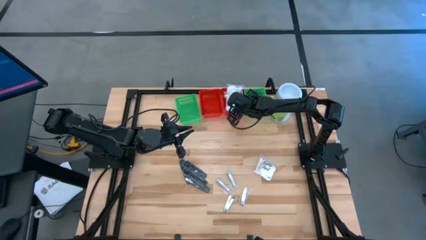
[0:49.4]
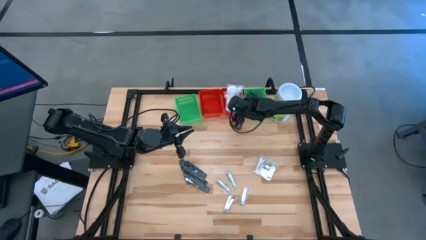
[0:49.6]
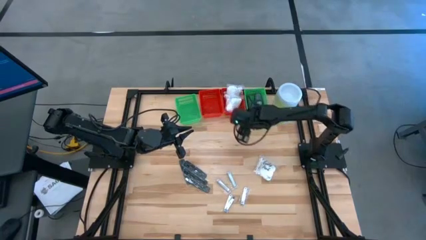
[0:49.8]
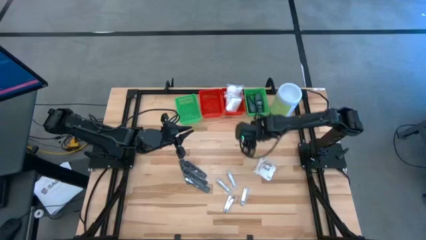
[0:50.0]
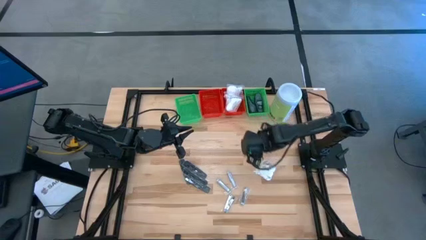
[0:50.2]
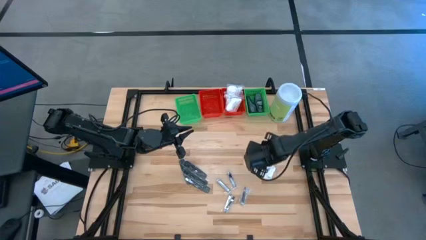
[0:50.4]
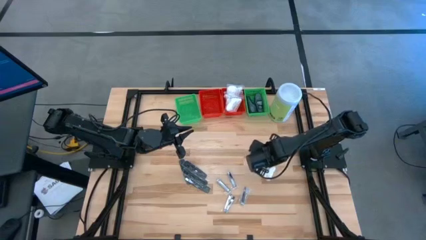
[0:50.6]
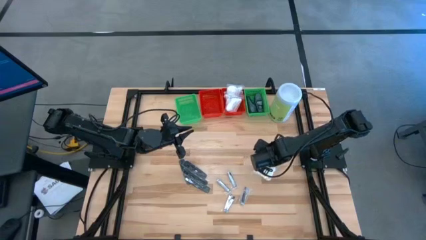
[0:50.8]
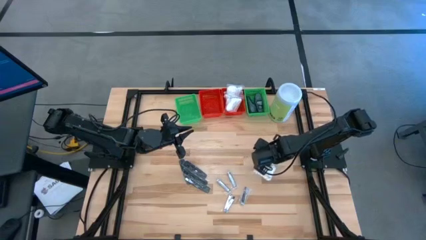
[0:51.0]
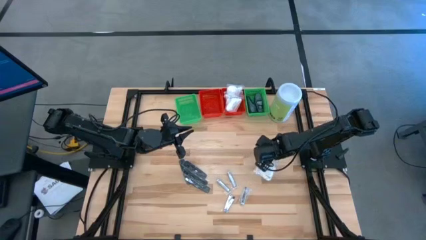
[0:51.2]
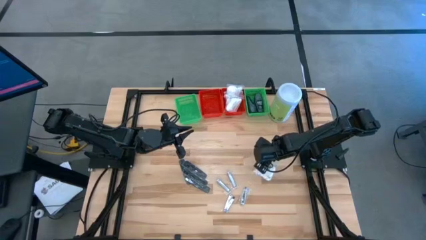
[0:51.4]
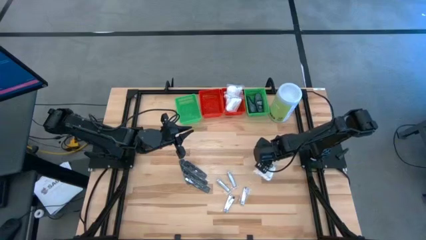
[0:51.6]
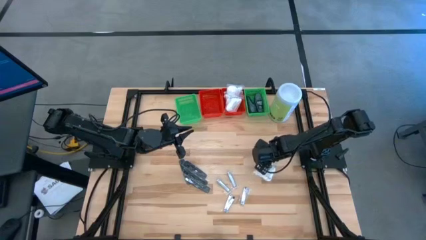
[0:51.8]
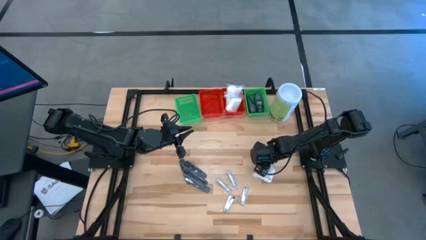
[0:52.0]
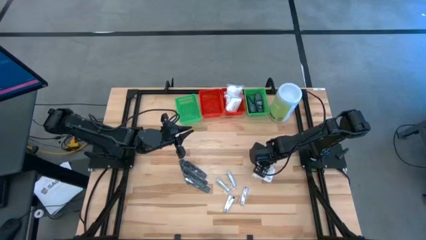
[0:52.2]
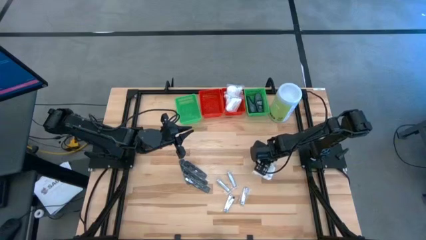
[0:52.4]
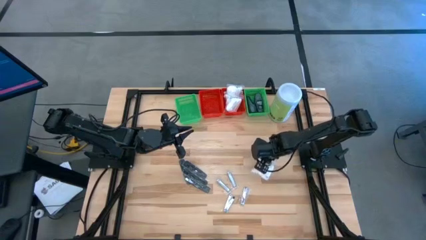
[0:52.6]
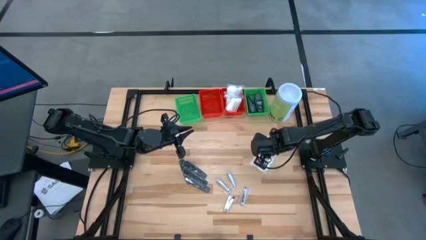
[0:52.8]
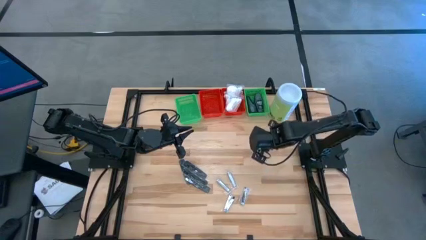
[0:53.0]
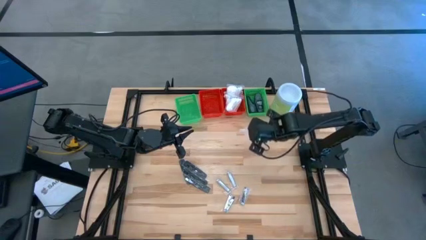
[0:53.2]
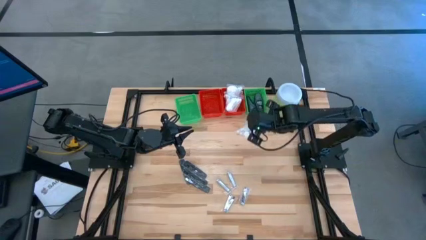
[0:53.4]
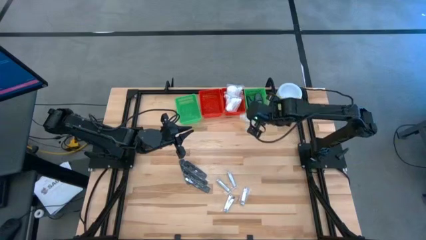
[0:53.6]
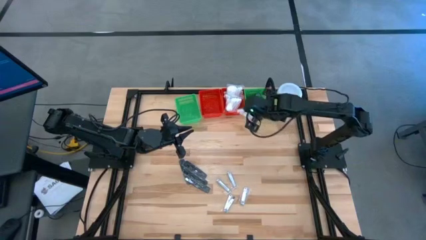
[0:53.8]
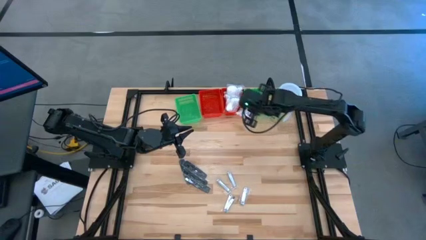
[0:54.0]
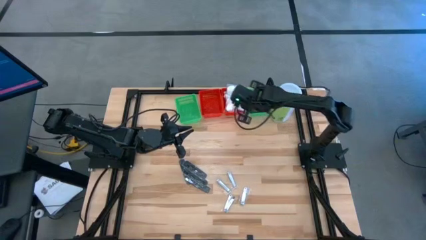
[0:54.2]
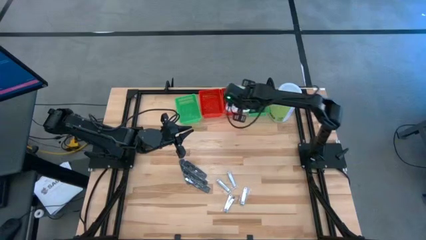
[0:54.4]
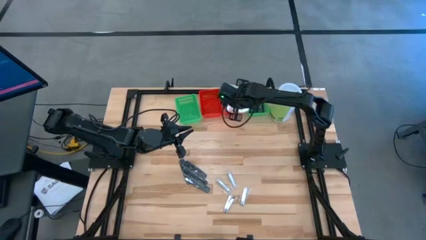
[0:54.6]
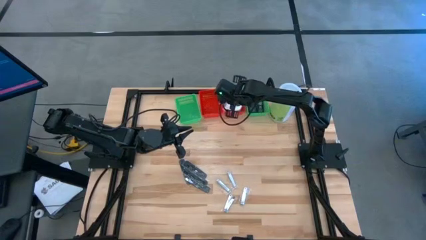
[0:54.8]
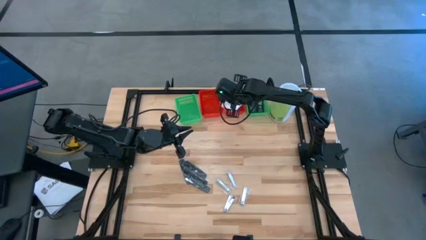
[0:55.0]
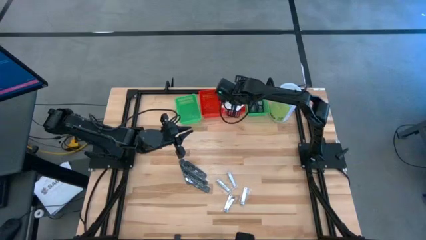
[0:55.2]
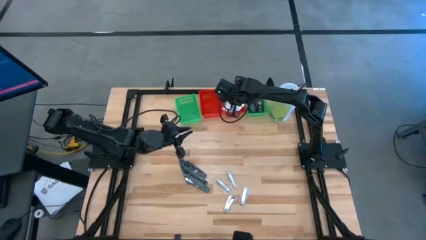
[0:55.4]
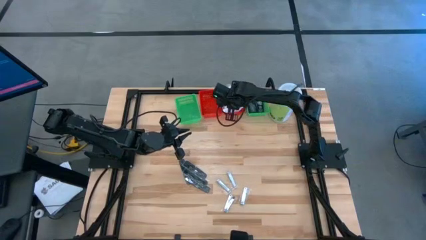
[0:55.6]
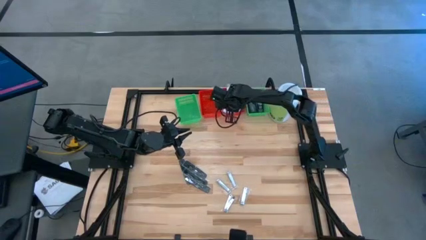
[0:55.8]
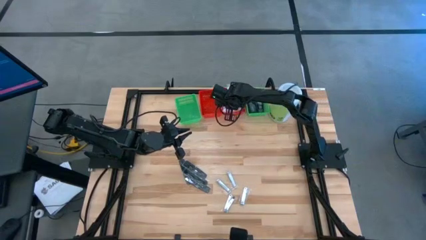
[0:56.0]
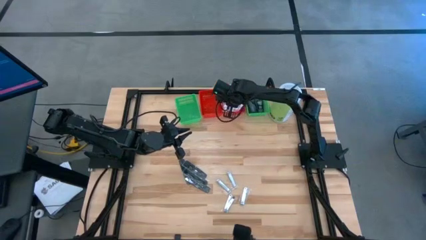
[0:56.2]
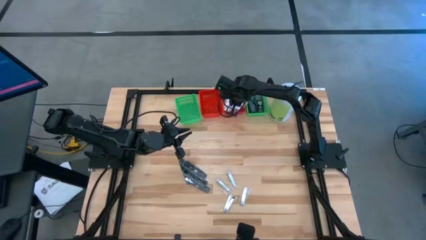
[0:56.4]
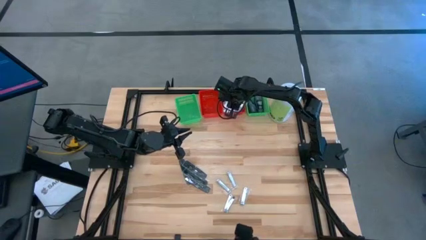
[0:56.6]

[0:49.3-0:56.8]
Task: Pick & Place Travel size toiletries
Put the white cotton pack into the right red bin

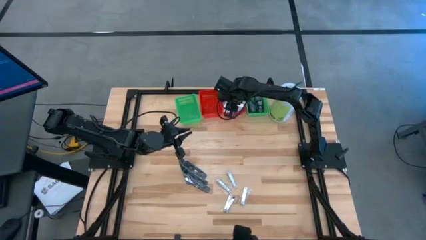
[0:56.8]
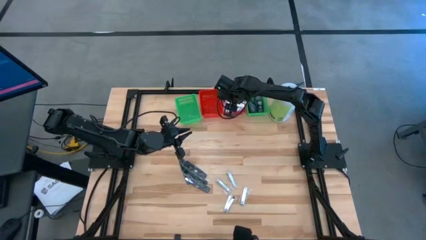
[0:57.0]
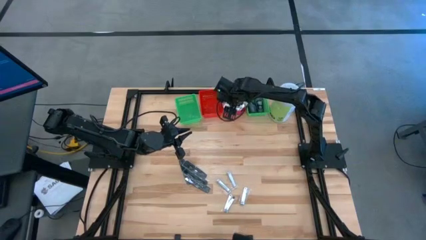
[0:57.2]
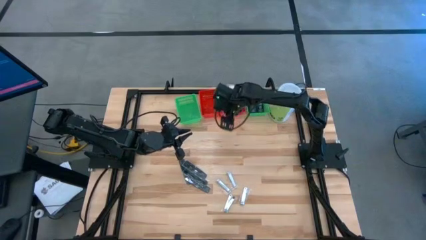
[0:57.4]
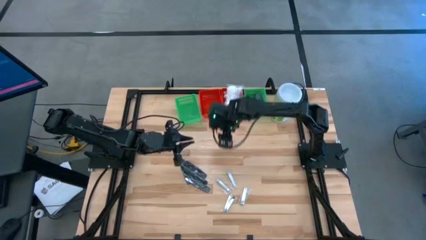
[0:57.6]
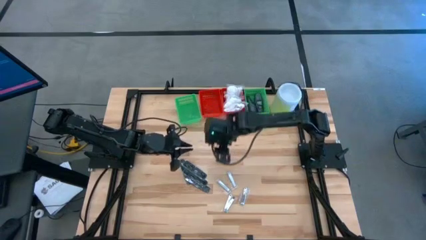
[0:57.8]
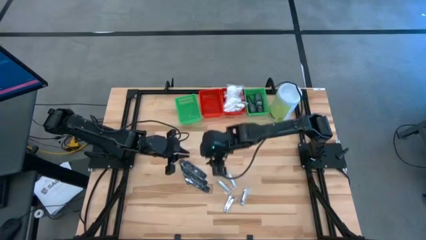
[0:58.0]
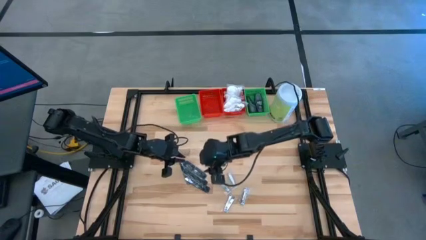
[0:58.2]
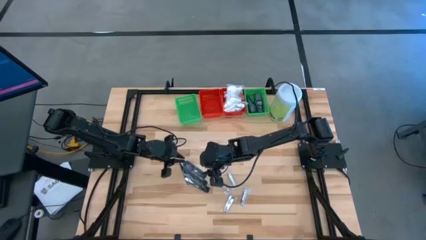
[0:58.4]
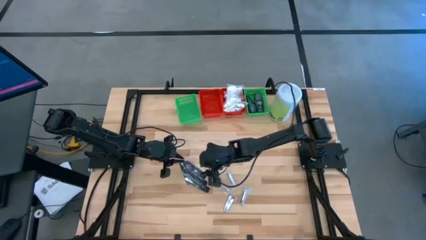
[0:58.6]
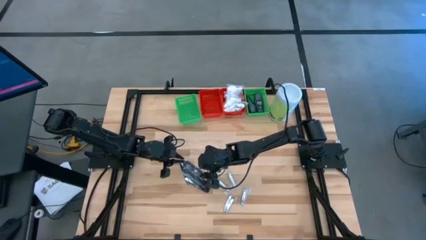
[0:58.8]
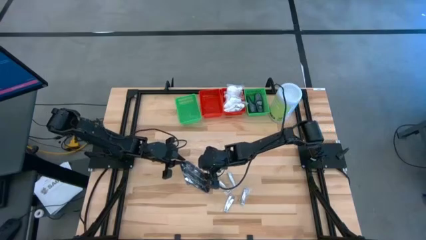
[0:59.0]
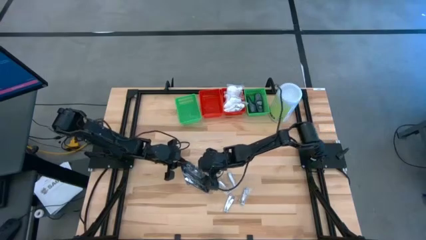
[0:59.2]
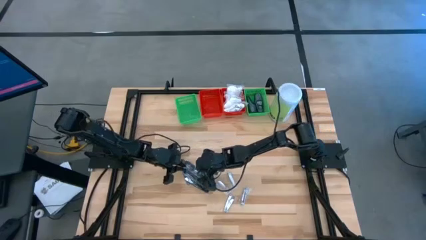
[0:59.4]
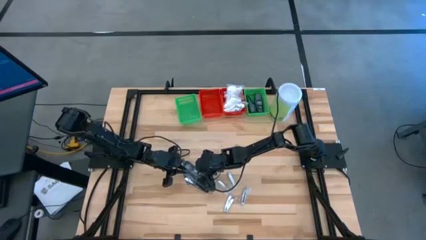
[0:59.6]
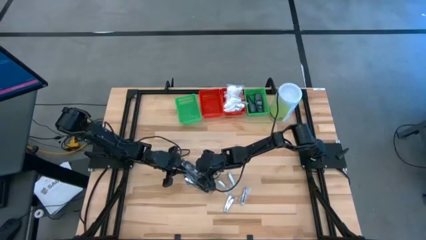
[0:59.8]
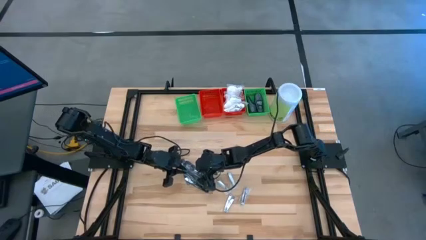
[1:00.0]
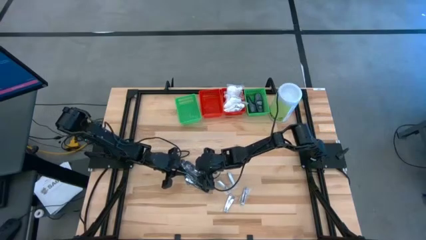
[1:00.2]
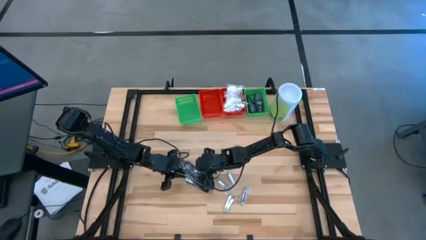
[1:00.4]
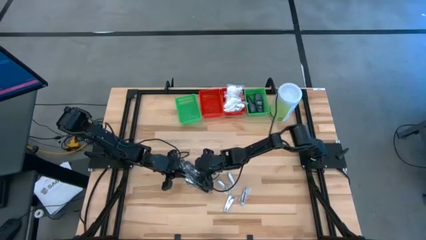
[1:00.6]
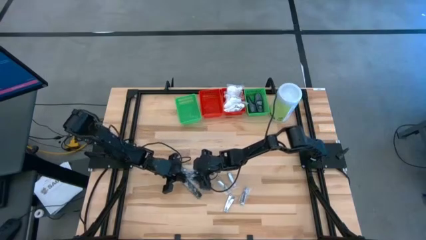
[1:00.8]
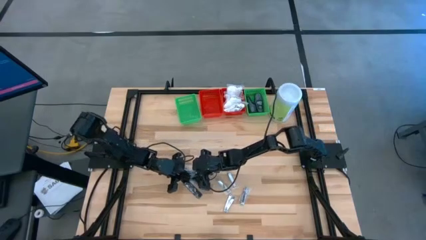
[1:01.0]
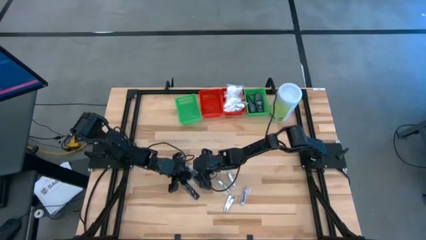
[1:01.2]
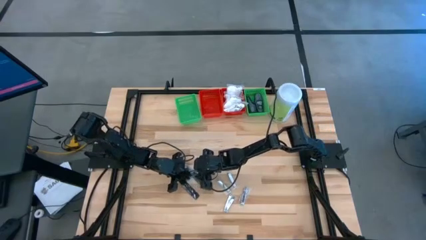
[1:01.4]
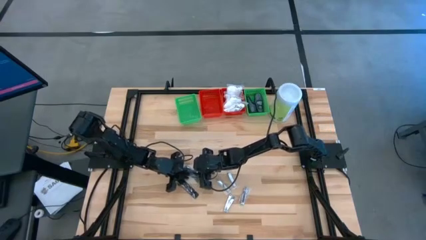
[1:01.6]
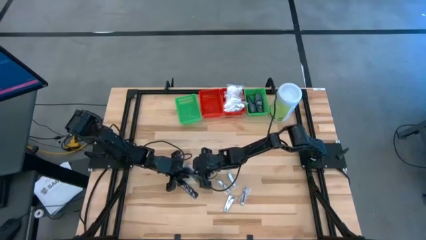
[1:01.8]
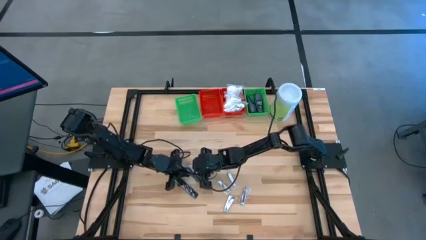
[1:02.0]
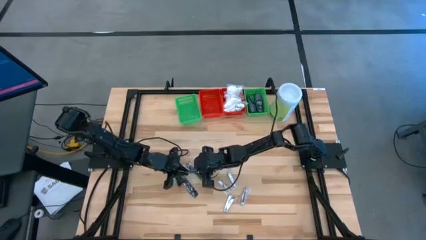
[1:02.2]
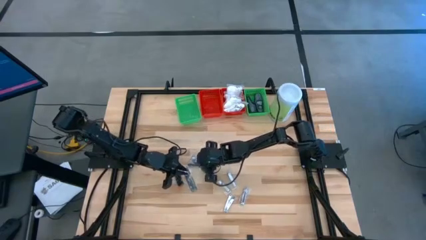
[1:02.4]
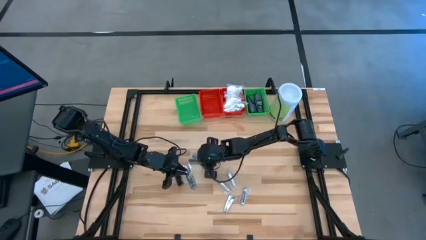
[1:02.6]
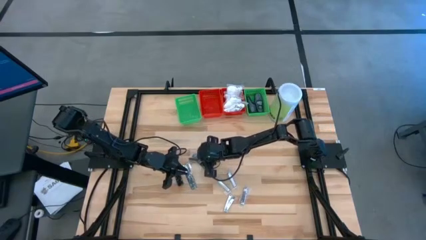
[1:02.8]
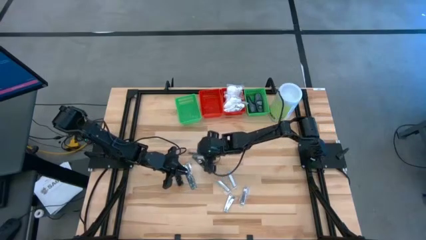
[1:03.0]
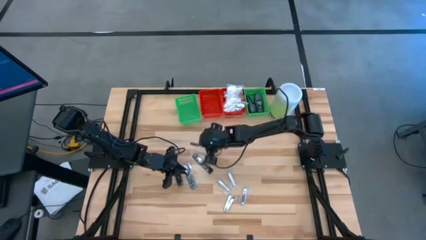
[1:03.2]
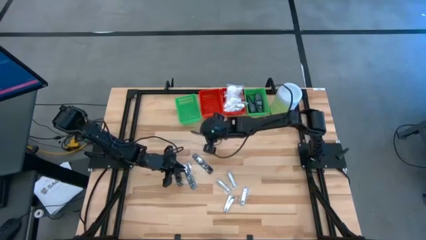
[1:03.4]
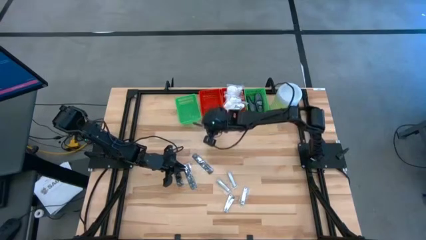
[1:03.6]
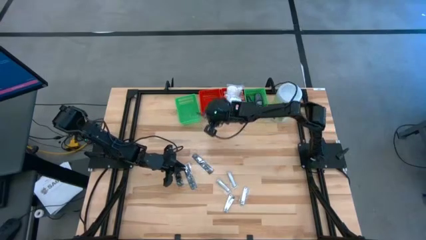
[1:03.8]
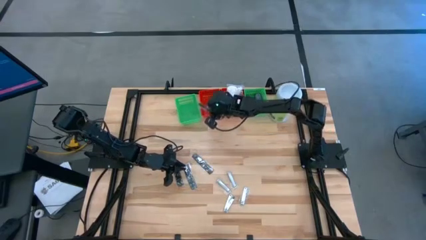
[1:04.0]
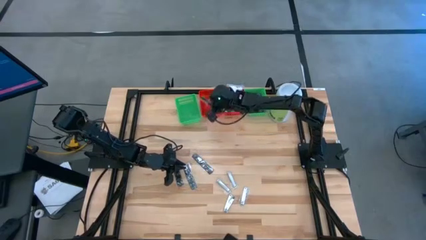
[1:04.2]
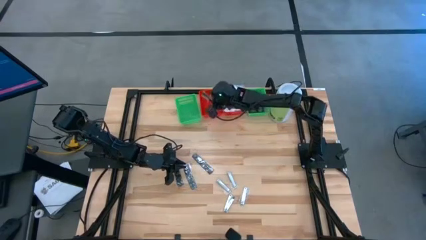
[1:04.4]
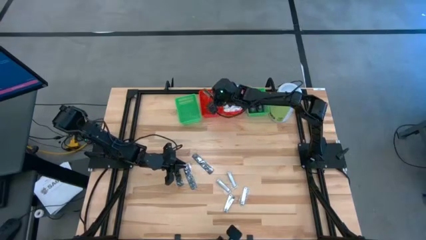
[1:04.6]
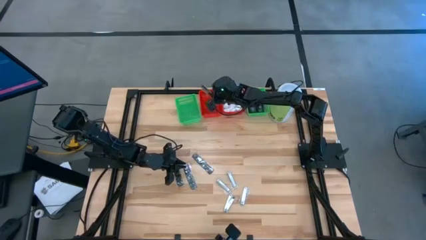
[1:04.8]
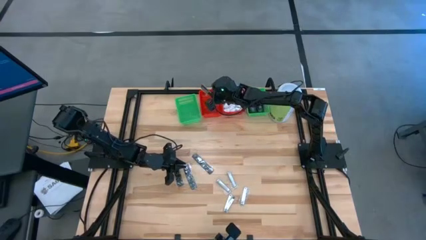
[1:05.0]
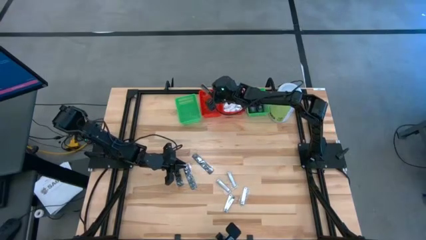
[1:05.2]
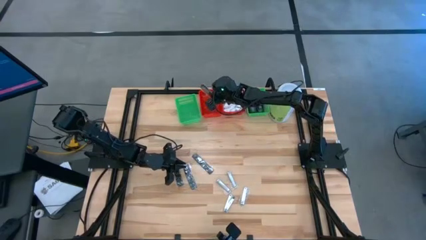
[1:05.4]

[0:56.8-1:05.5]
Put the black comb into the left red bin
